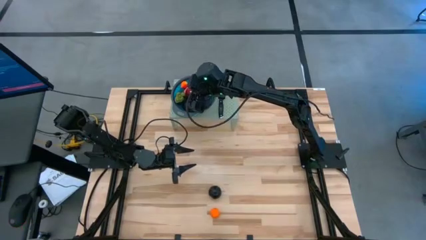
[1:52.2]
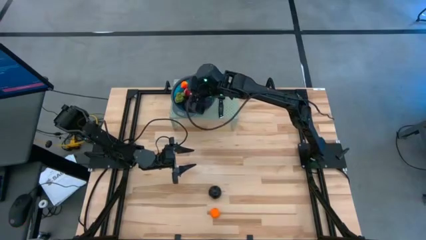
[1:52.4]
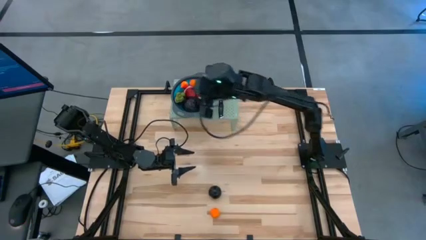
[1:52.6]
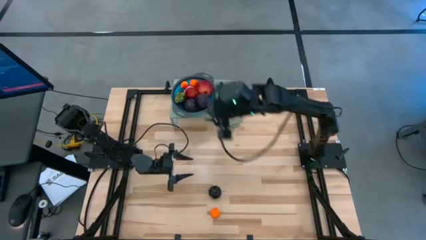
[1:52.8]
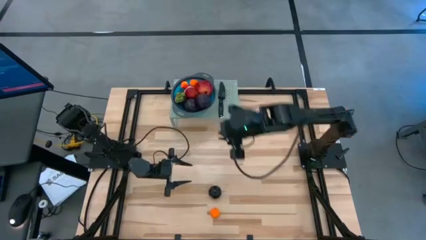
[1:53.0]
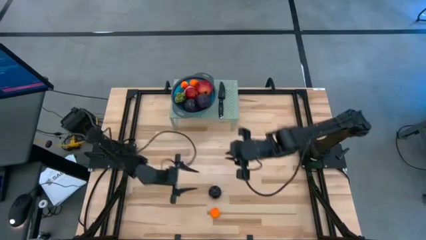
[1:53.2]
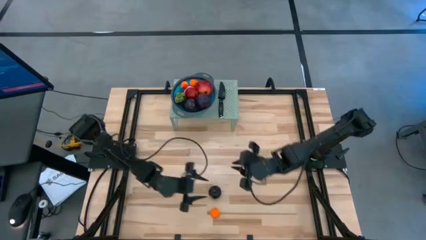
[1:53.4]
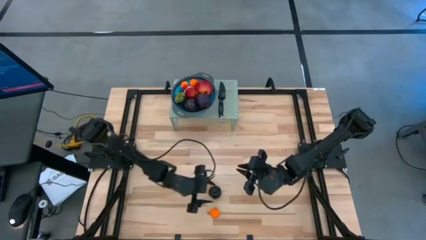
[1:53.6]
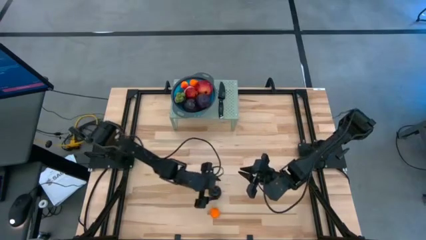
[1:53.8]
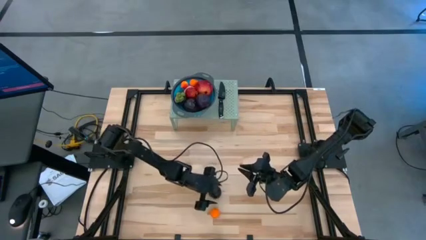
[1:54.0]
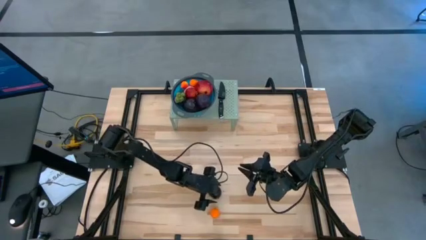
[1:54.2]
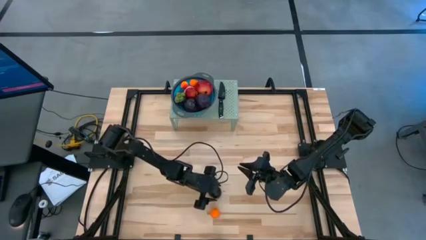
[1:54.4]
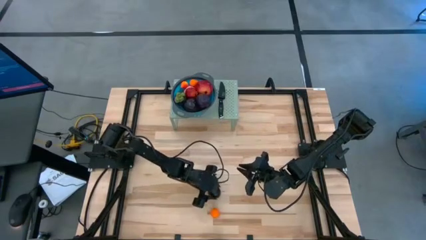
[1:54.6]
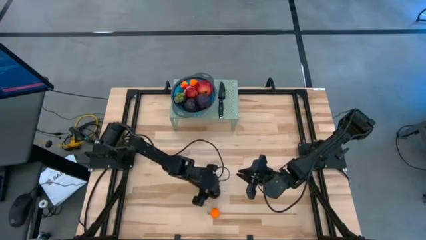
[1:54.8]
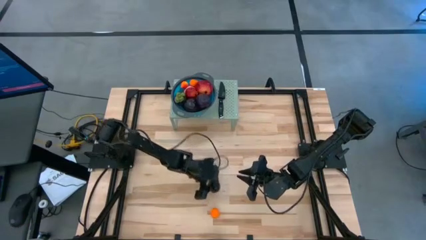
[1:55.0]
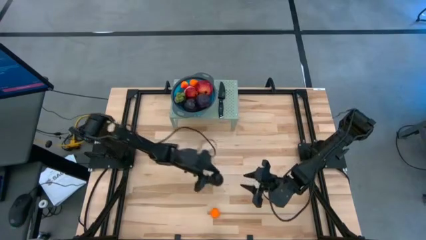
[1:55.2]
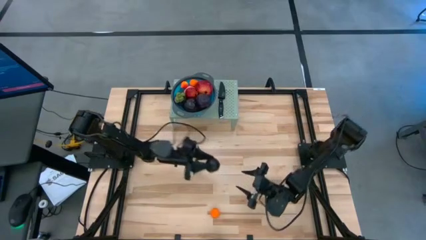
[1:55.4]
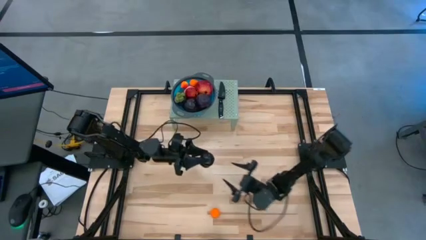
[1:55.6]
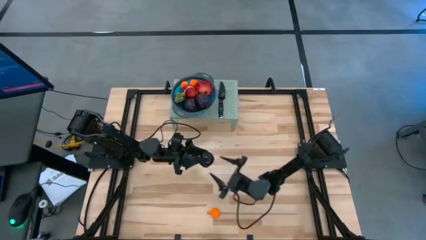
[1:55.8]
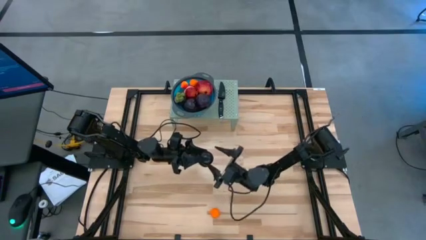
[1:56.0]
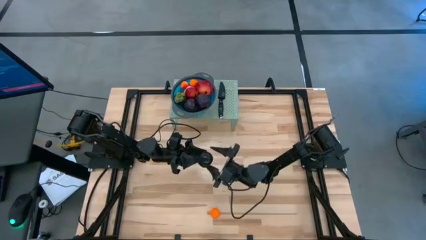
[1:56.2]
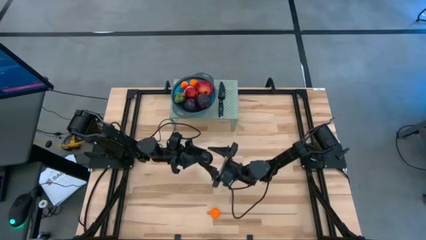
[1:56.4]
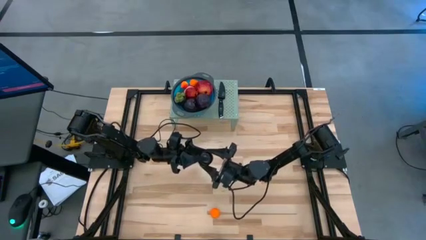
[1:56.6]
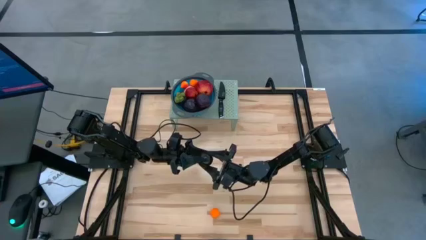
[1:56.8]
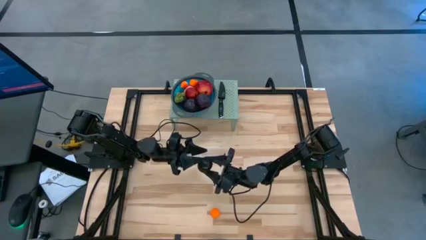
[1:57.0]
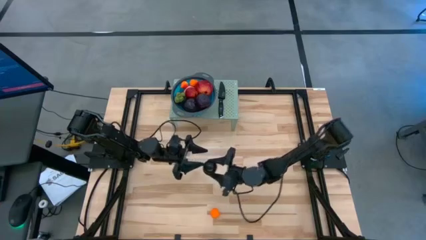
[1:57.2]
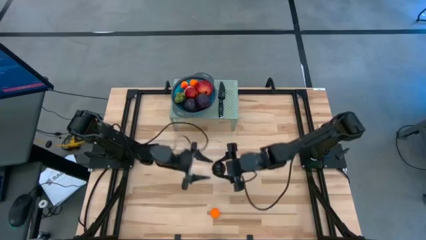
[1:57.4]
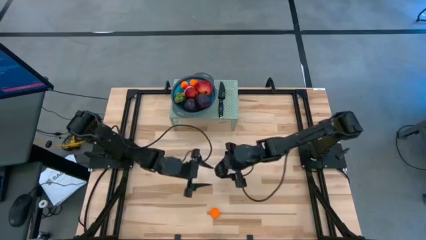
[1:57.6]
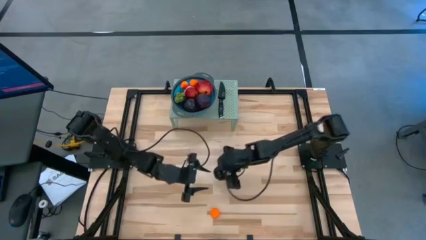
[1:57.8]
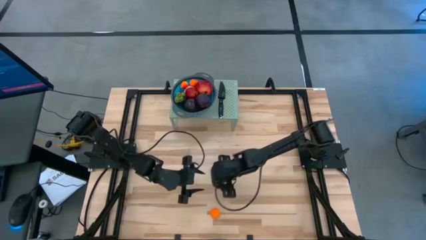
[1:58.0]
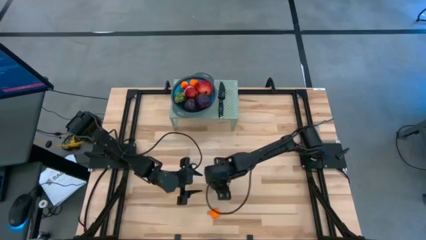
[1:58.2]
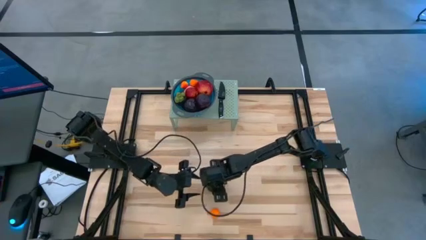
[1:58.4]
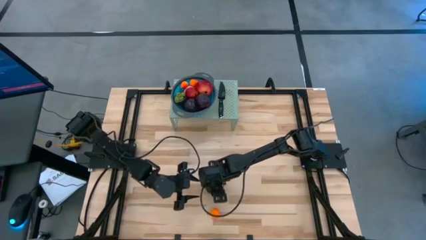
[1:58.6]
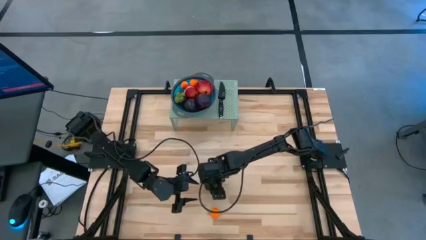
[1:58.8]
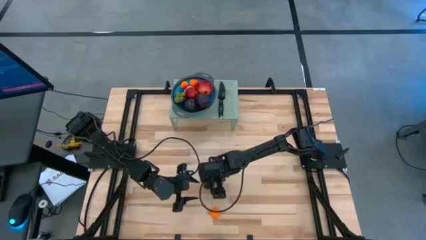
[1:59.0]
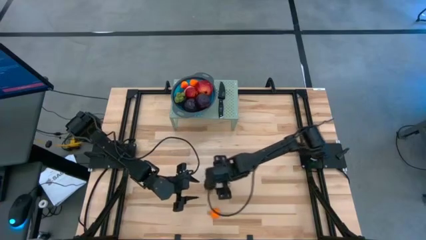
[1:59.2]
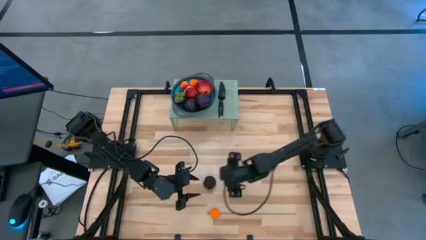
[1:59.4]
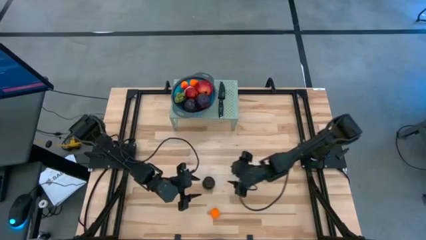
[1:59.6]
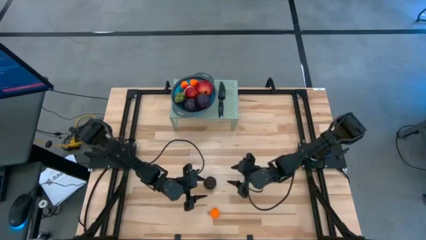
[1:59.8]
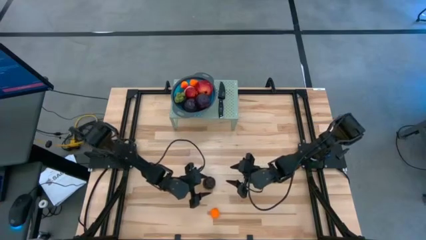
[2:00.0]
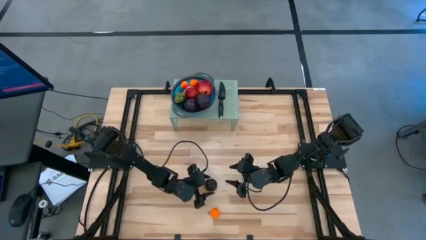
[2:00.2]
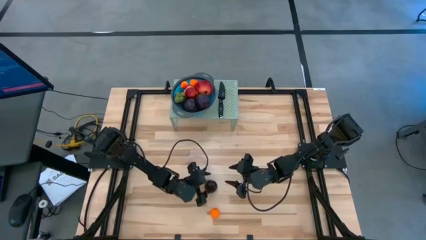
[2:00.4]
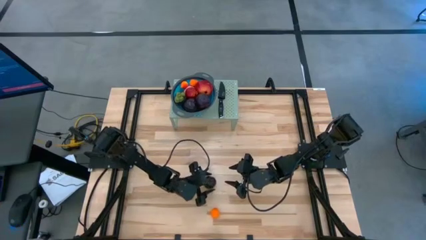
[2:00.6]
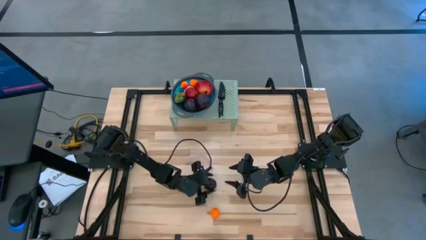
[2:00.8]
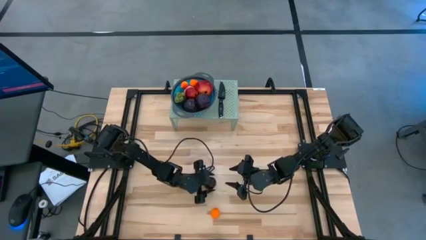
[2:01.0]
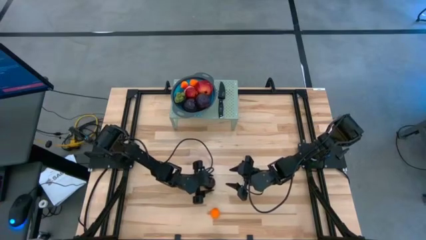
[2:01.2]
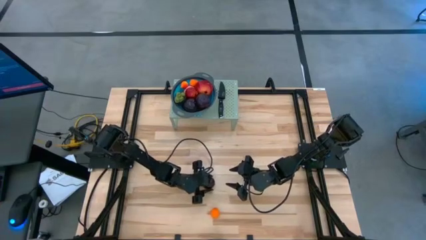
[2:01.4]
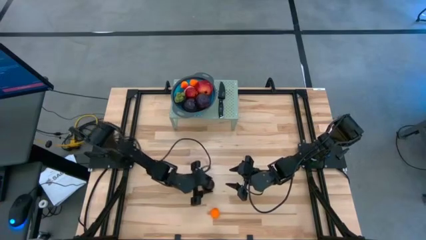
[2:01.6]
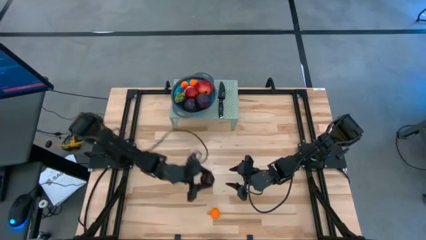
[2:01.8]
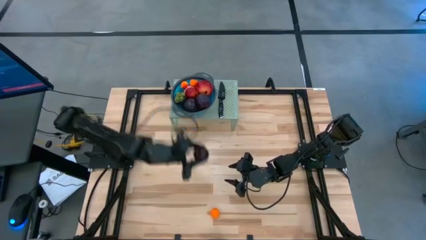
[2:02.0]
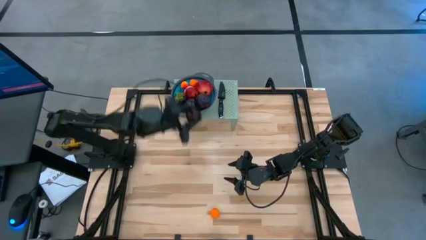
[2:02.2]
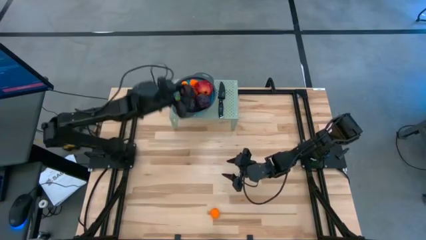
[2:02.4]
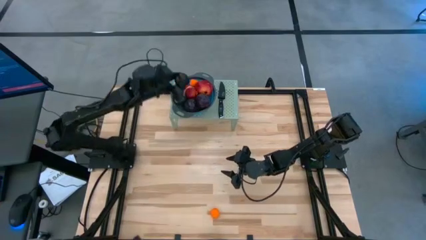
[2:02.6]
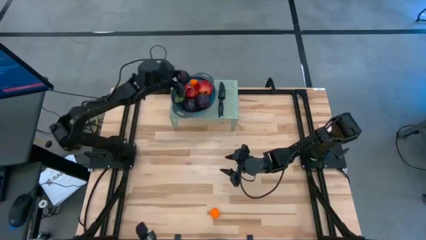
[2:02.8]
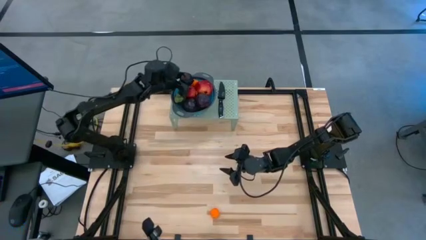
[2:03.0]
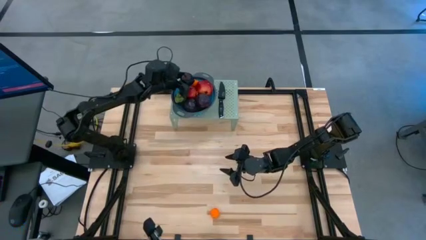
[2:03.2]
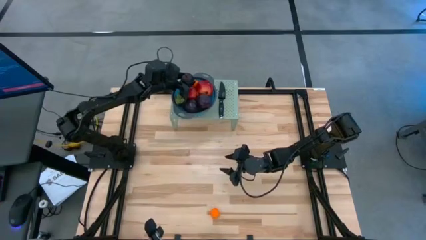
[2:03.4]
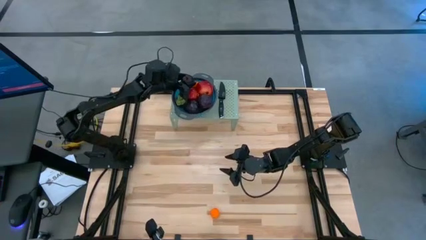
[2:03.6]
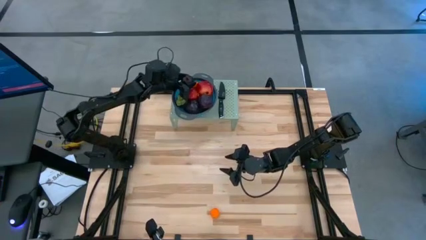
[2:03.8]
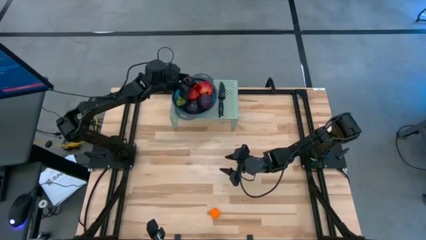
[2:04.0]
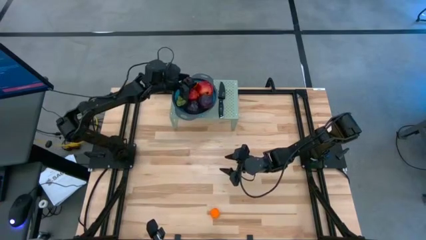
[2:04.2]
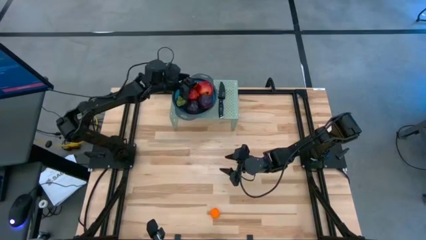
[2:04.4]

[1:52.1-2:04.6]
Task: Pick & Place Fruit
Put the purple plum into the blue strainer bowl

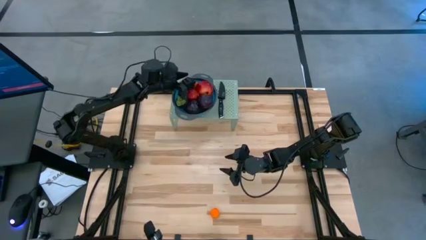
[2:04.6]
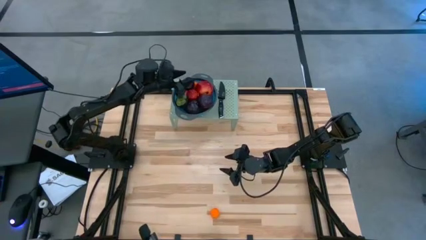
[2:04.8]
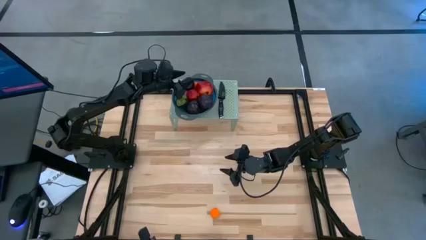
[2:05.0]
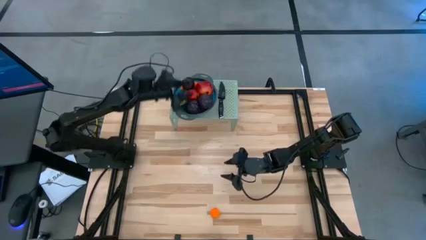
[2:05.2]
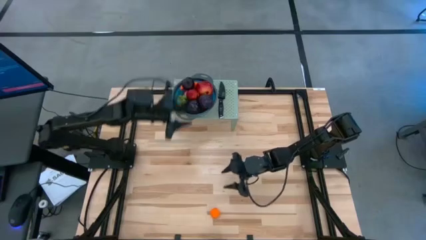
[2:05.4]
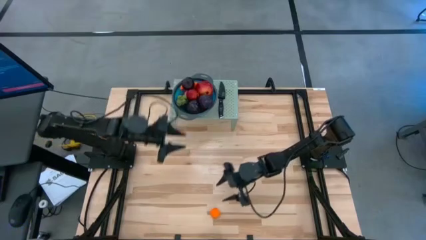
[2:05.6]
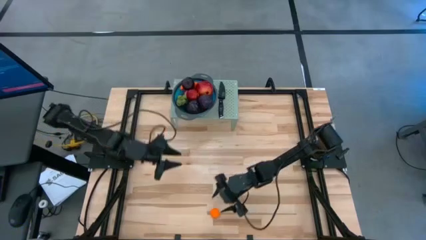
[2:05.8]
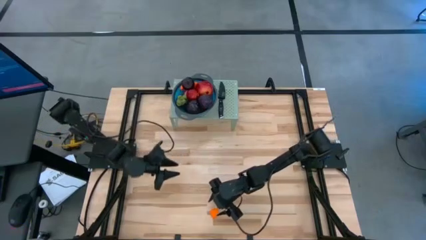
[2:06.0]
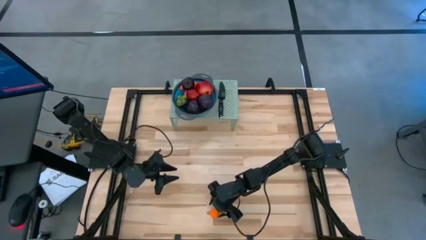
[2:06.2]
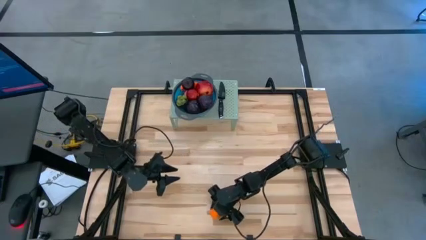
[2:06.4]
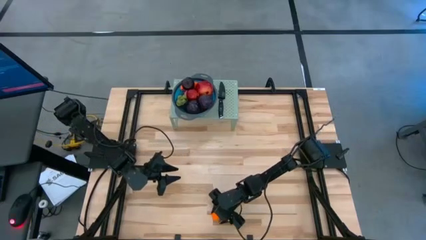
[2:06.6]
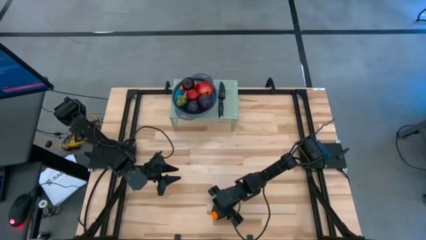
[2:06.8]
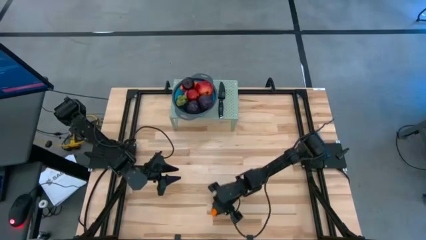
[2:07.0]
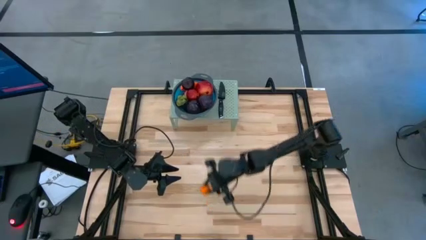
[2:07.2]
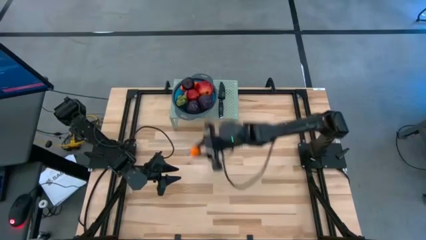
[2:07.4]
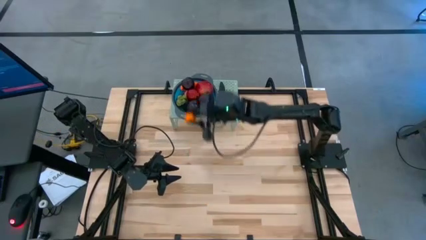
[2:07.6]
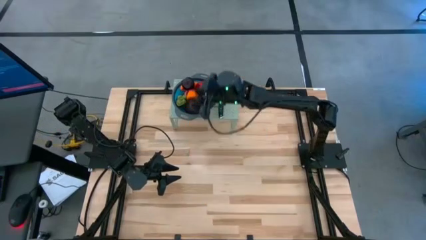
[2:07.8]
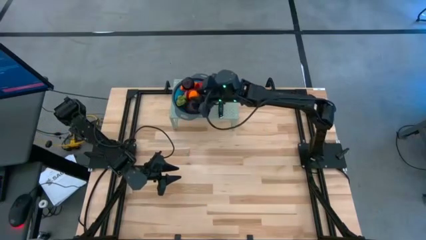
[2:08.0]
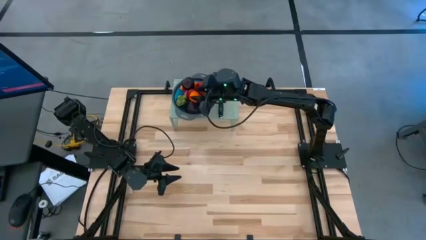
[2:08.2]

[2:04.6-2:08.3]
Put the orange into the blue strainer bowl

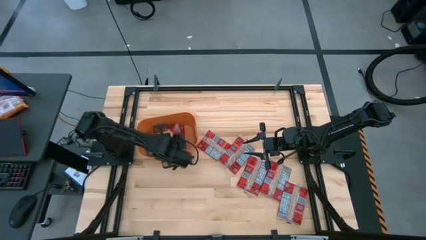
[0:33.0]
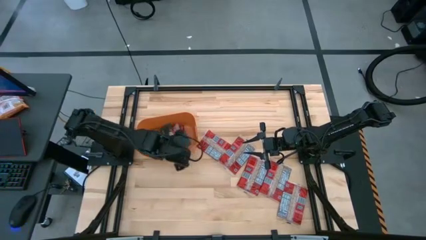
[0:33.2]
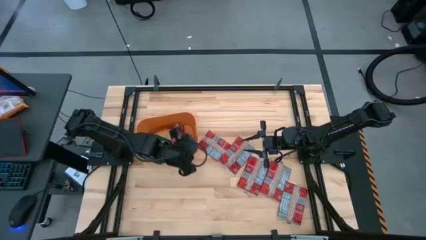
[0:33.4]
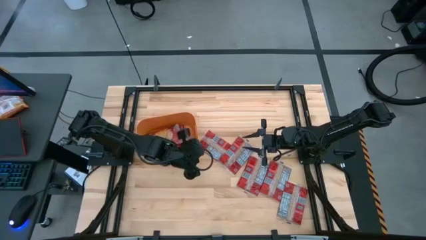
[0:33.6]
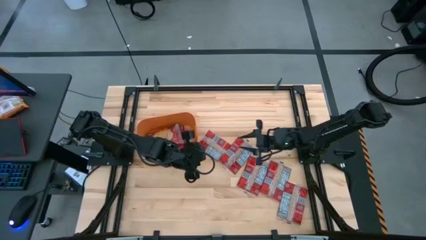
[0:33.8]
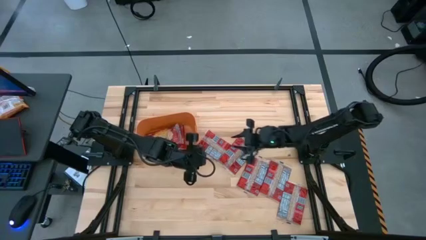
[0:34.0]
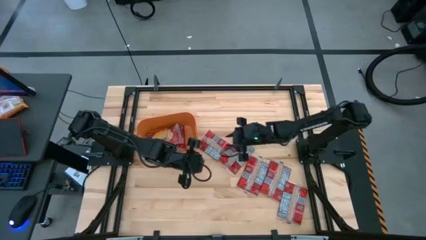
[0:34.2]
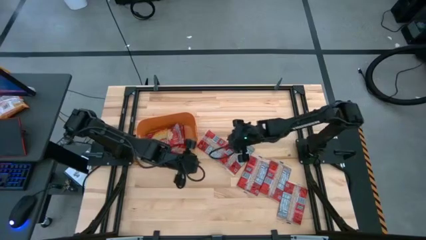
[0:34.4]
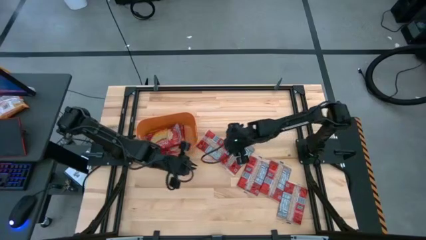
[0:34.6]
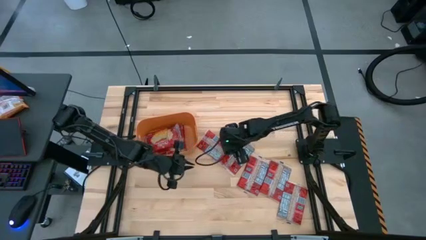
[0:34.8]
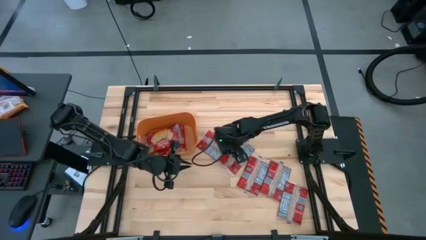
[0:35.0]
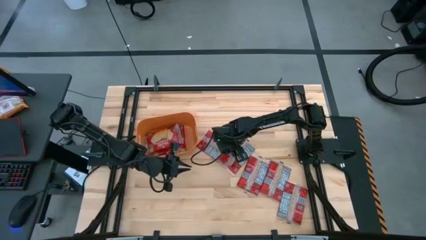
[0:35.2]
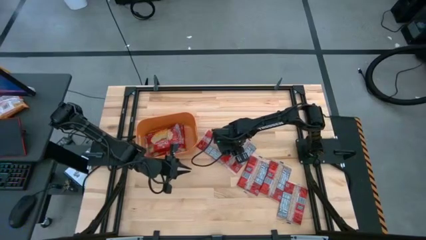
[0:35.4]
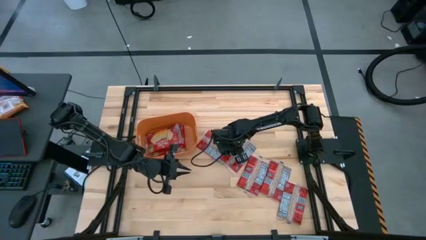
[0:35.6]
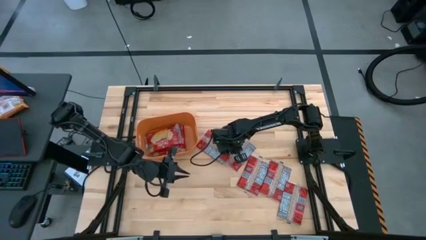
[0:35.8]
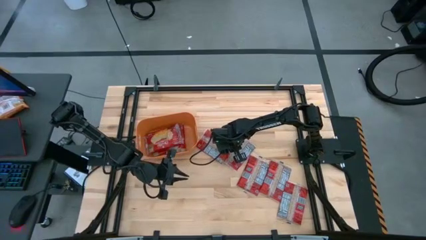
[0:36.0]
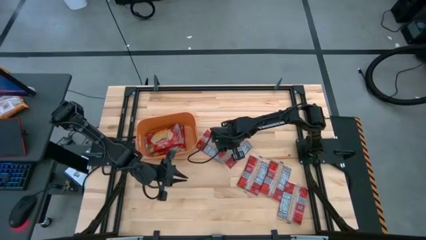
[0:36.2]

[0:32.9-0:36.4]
Task: Sort popcorn bags into baskets
Put the red popcorn bag into the orange bin
